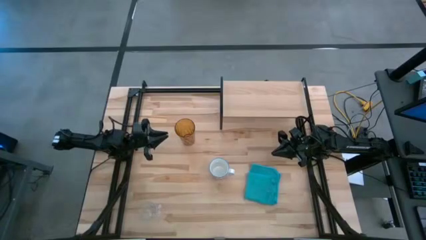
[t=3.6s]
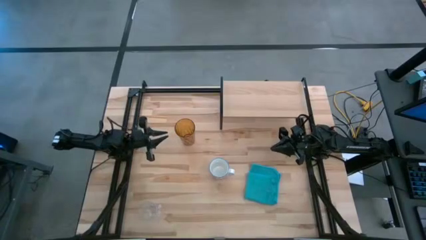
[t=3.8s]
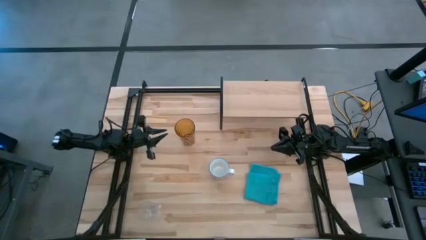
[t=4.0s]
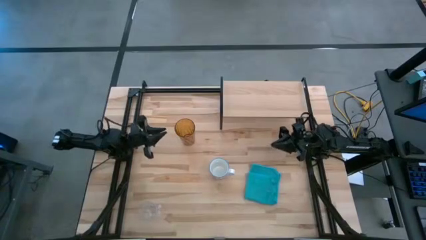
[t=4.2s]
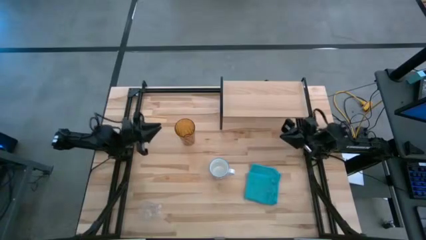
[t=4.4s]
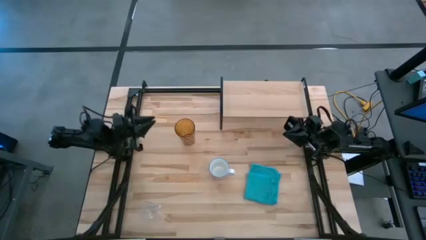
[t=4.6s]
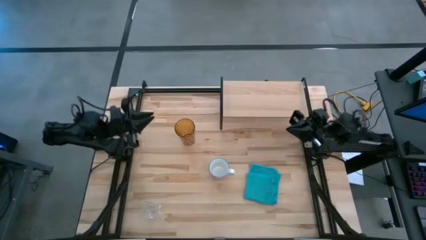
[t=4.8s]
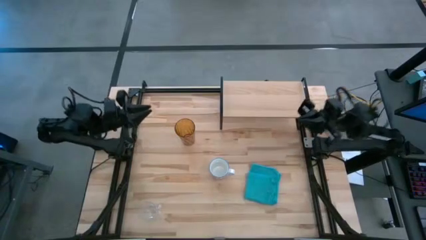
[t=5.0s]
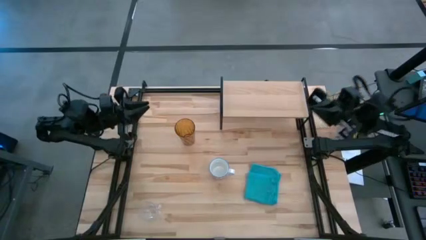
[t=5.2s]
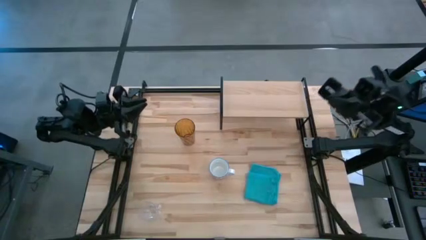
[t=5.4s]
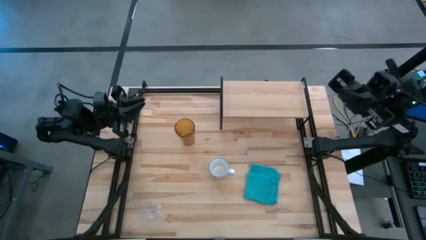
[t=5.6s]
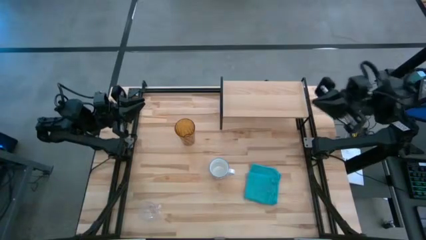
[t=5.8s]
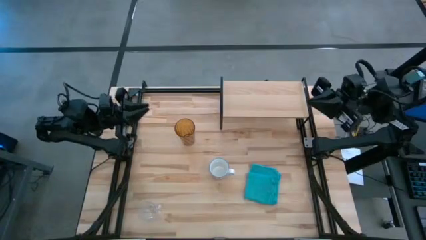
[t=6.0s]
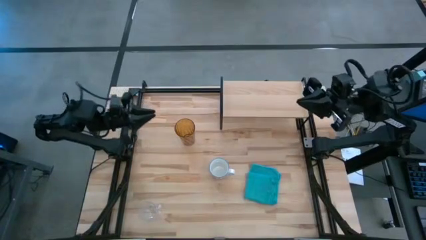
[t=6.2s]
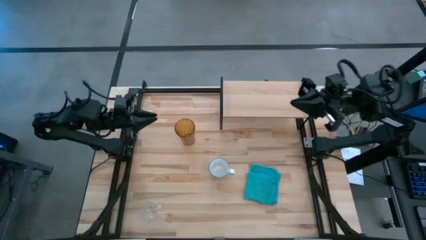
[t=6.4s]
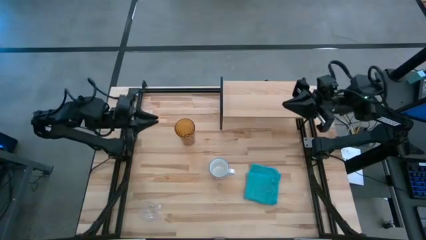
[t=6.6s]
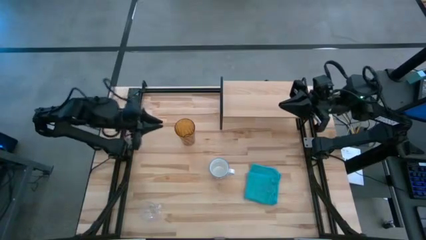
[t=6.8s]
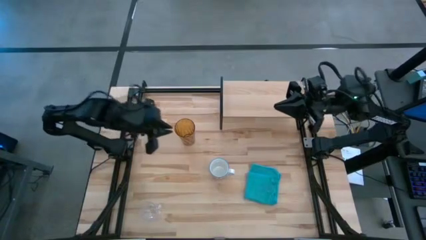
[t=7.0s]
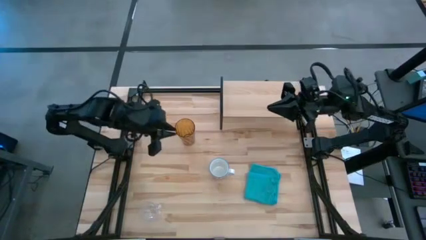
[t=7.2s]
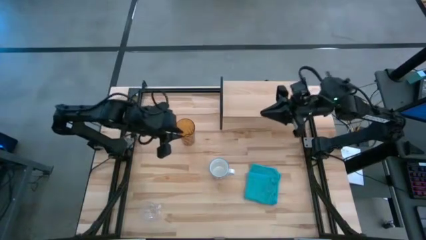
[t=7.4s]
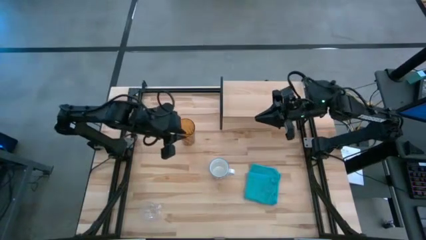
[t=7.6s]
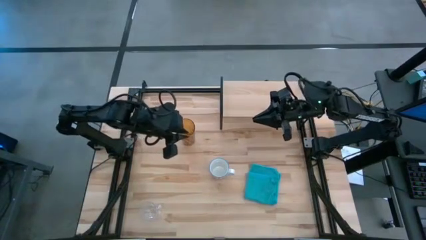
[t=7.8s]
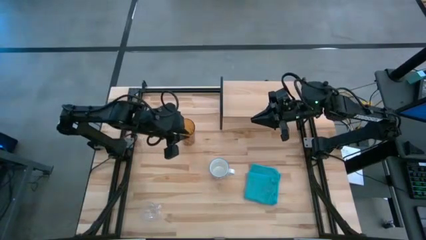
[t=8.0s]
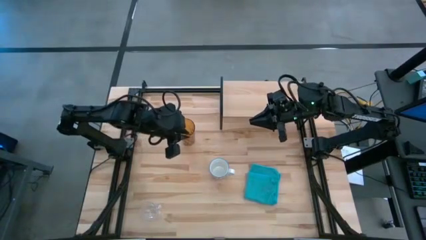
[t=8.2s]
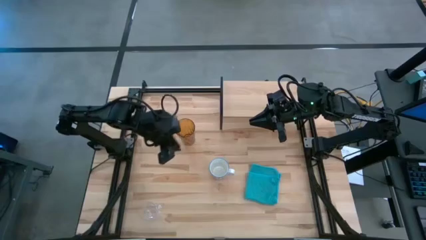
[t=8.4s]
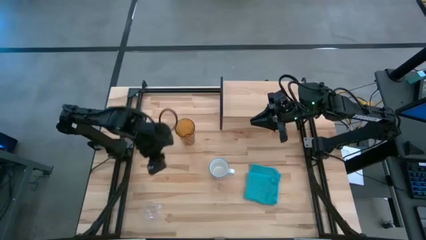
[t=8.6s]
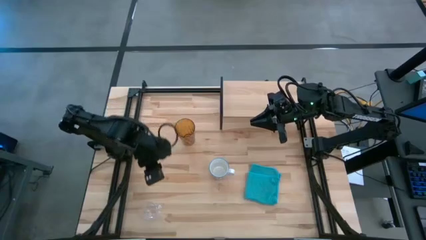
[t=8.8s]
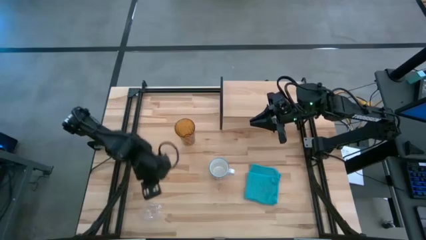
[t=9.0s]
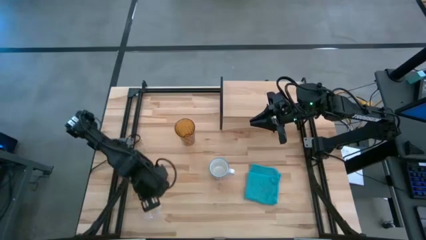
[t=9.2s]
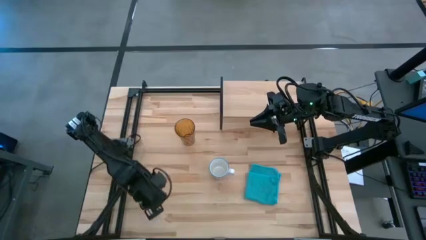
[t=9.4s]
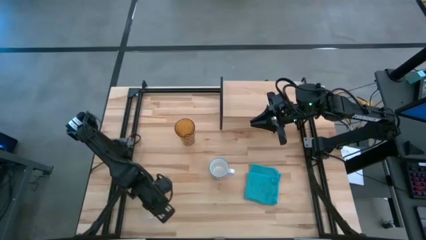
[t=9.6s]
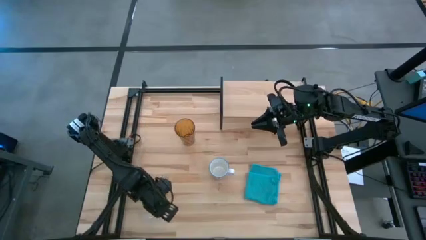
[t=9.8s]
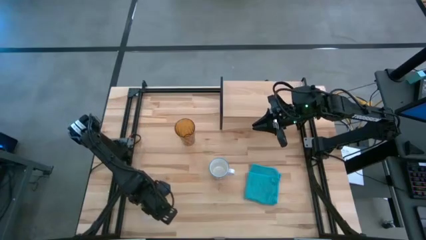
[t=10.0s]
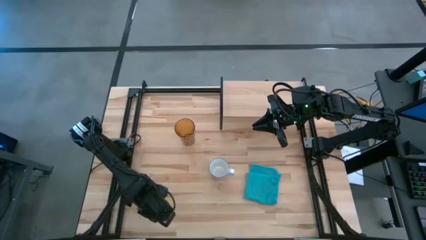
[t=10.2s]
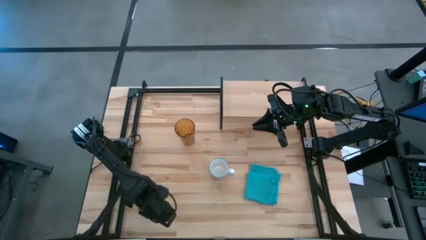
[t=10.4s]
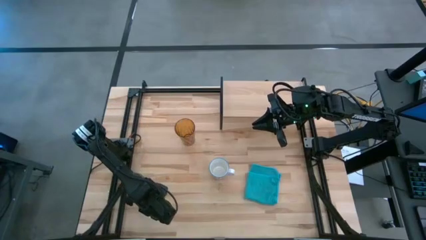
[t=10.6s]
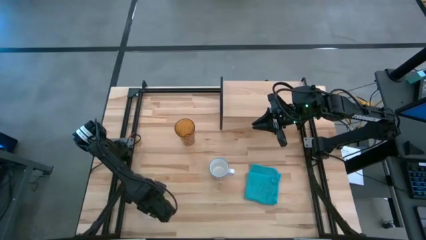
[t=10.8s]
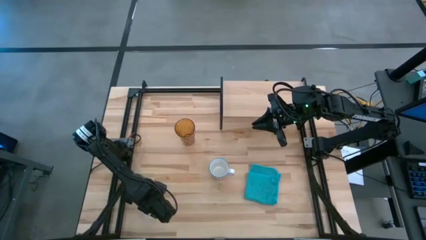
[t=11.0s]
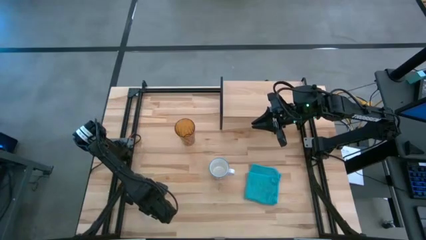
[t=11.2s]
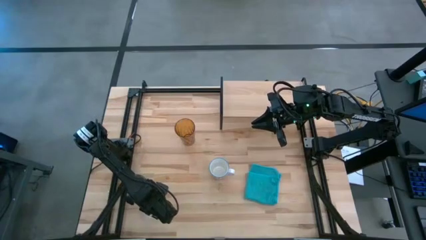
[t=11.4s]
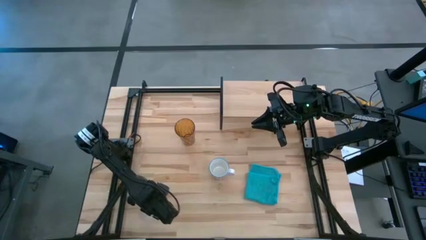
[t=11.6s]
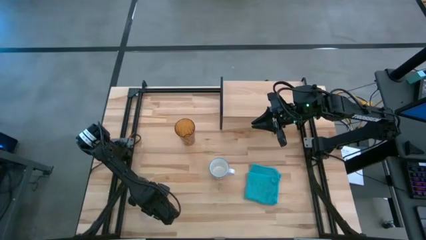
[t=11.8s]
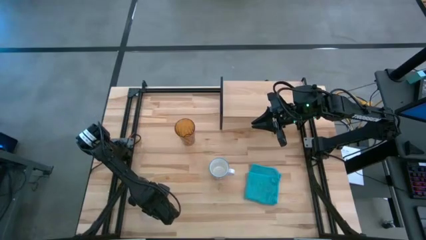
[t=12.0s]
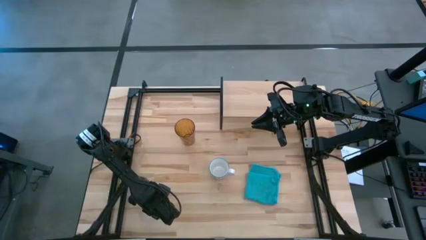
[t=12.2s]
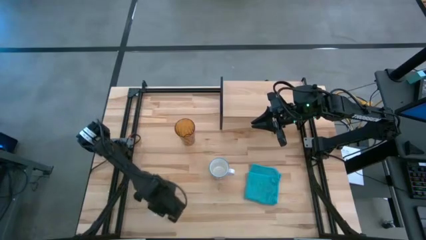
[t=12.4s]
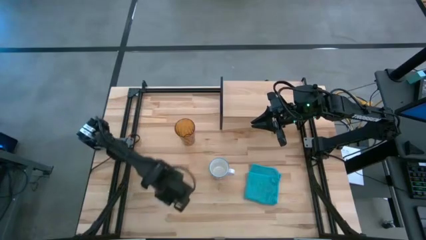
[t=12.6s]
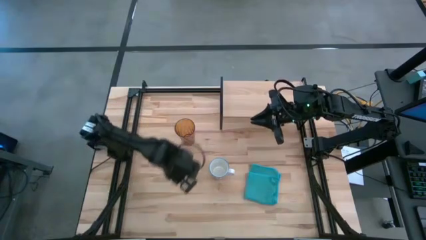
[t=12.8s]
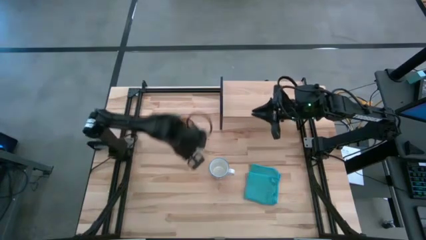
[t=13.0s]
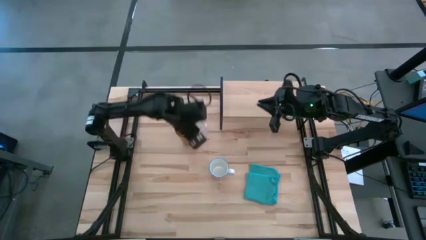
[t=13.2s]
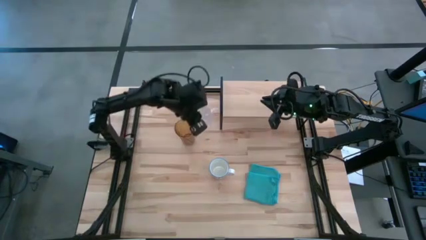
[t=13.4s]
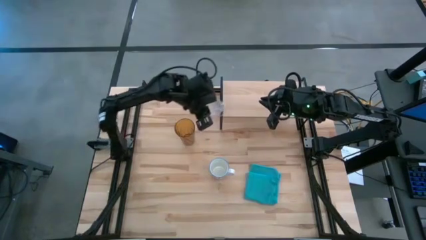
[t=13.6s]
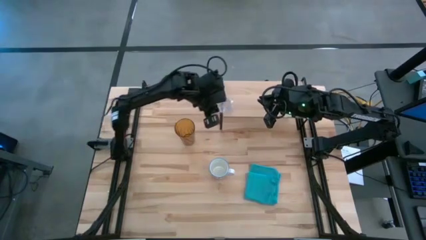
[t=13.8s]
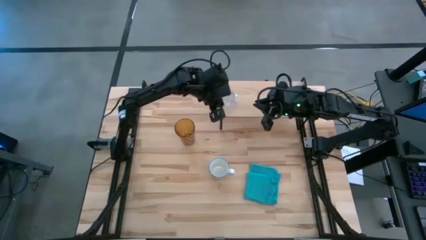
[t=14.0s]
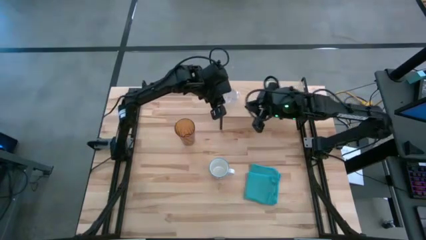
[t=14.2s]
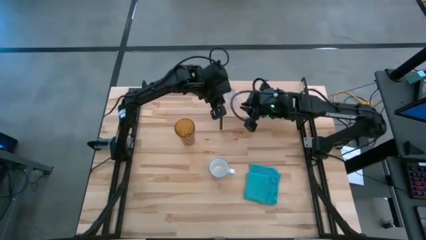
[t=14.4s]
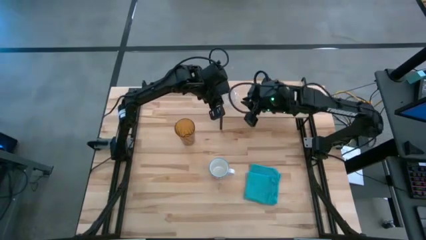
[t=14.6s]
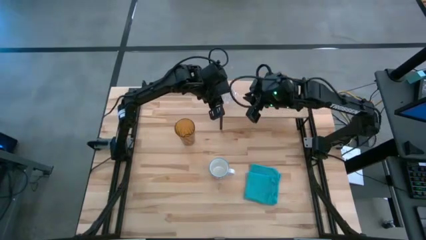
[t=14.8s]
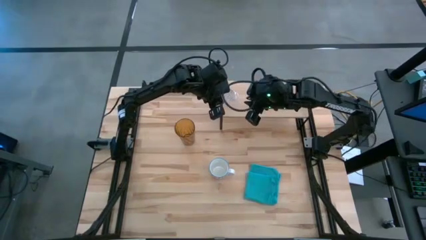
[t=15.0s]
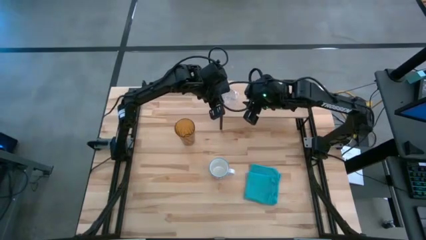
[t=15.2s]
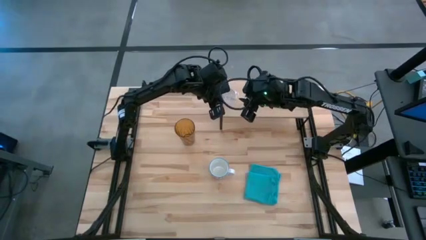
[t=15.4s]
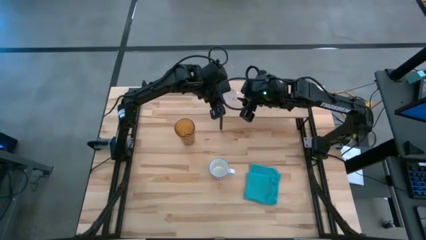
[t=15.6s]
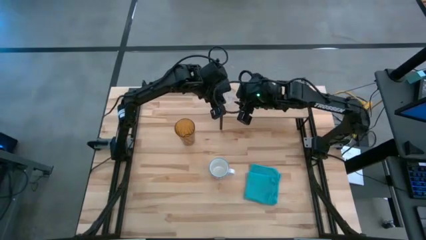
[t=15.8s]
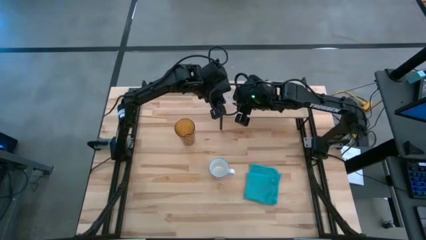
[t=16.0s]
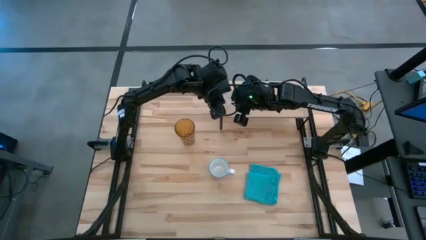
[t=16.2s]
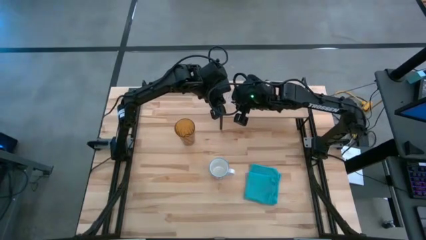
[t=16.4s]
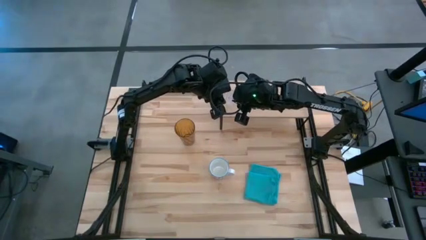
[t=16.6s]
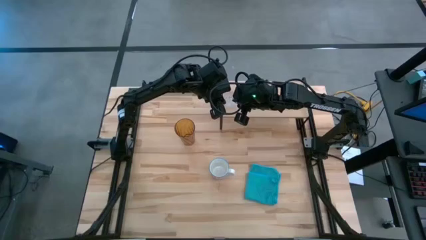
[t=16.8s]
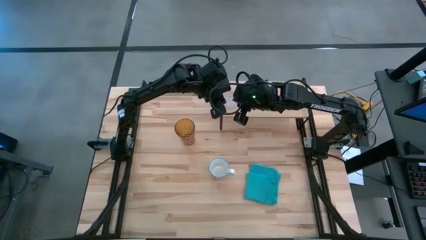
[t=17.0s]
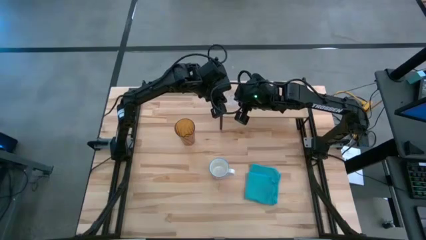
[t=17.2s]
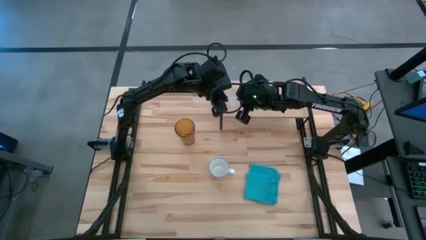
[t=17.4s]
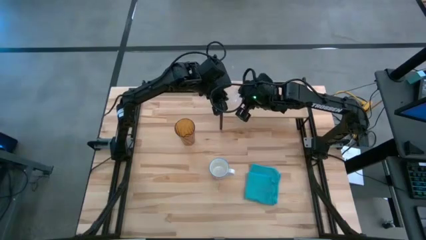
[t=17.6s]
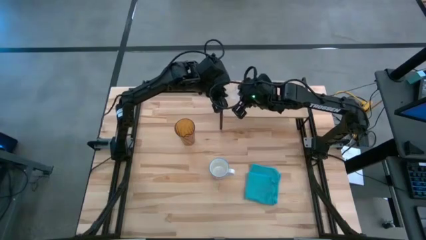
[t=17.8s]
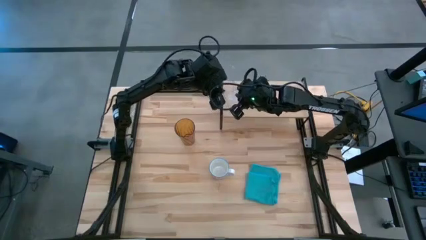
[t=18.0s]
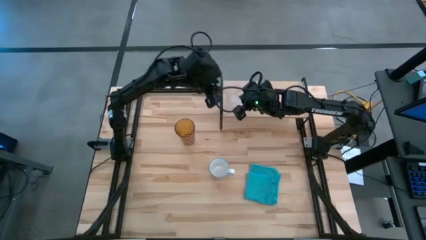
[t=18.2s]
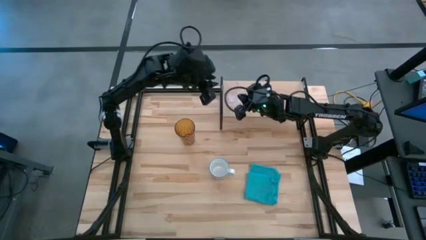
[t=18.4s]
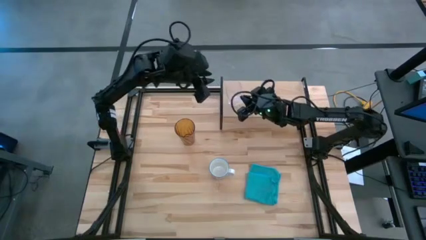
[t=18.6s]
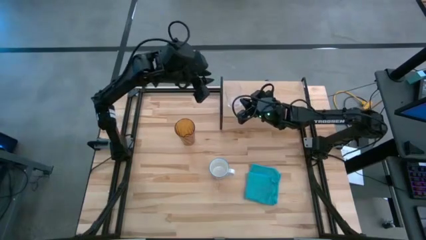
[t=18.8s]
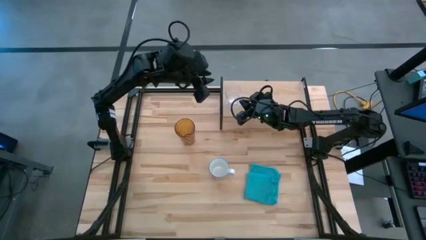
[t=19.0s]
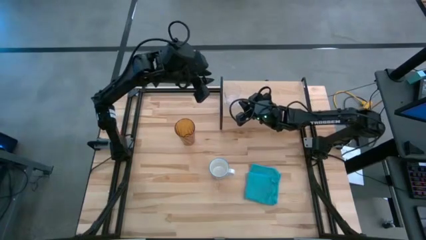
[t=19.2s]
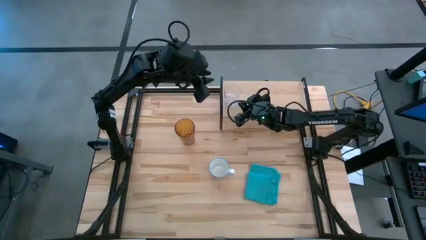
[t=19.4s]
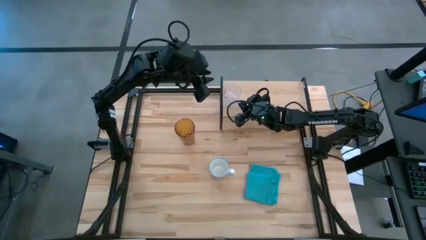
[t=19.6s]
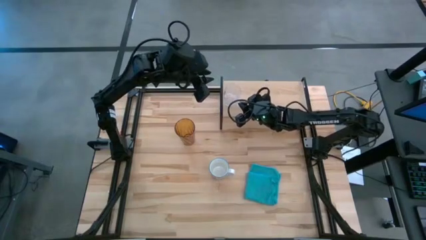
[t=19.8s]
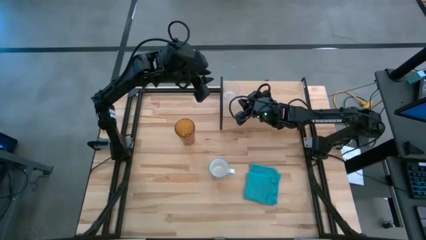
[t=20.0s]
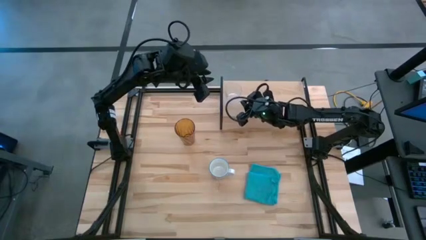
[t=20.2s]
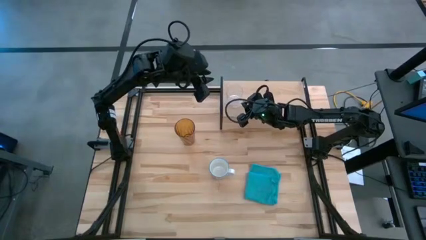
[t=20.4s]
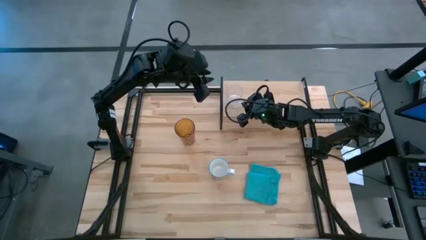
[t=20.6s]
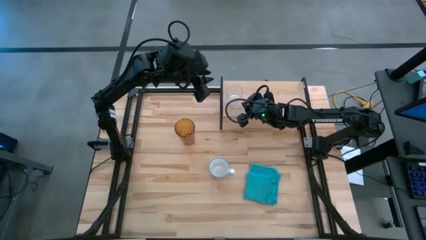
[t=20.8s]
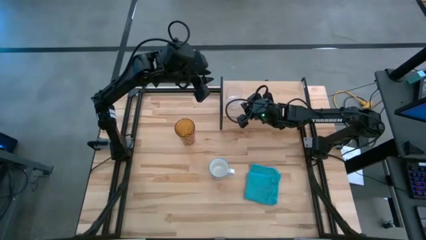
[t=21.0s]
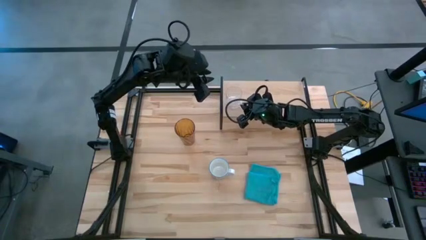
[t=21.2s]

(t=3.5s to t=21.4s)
Task: Stack small to large cups/mugs on shelf
Put the transparent mug on the shelf
